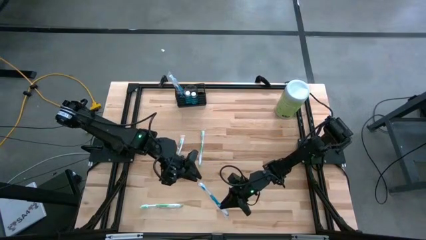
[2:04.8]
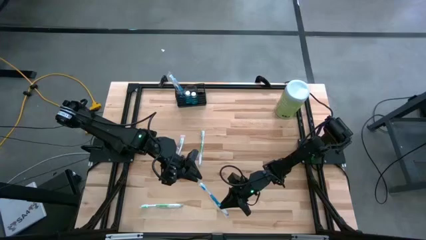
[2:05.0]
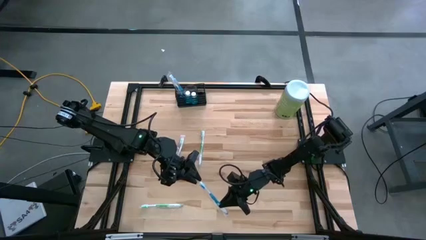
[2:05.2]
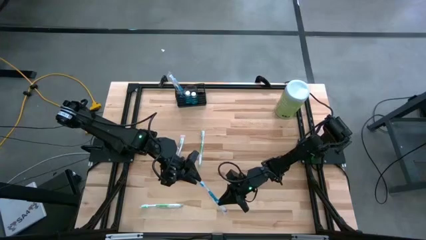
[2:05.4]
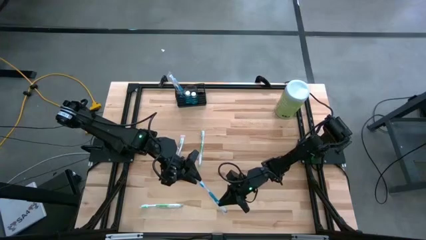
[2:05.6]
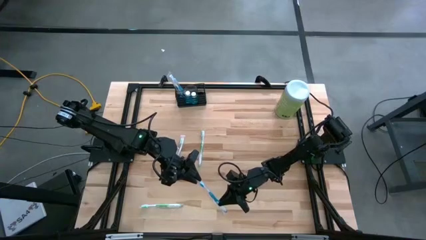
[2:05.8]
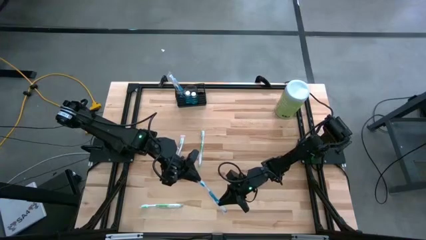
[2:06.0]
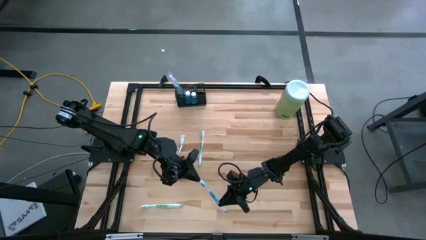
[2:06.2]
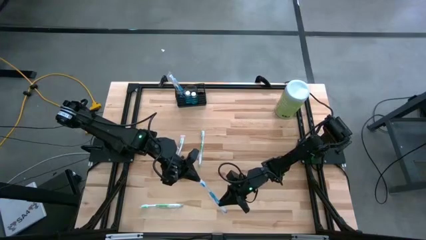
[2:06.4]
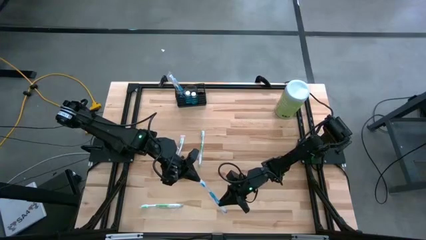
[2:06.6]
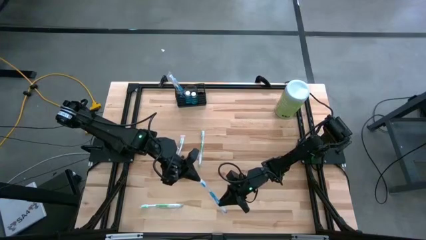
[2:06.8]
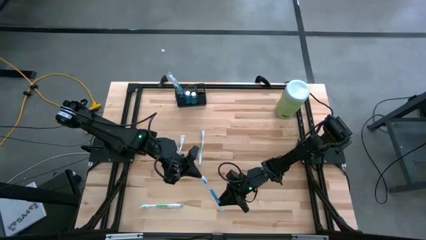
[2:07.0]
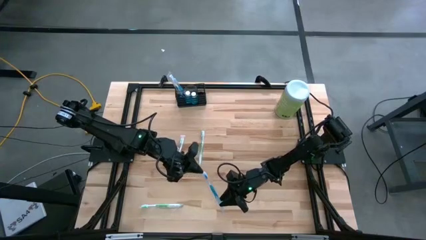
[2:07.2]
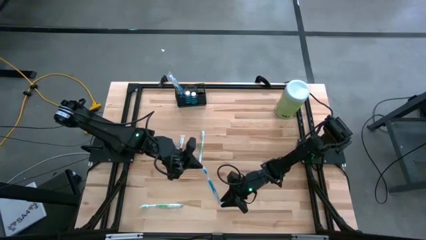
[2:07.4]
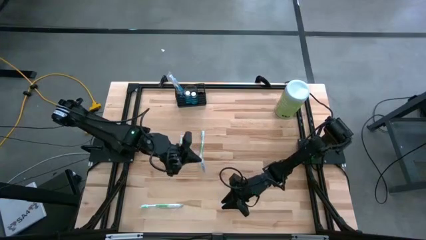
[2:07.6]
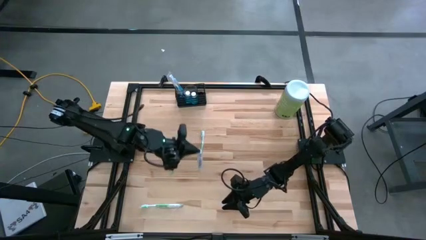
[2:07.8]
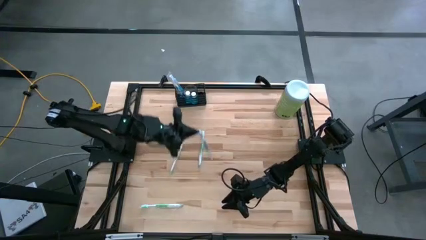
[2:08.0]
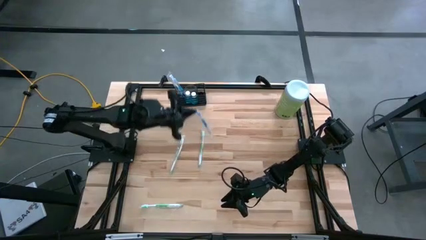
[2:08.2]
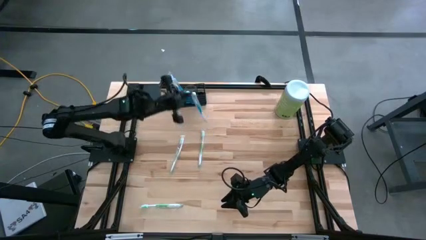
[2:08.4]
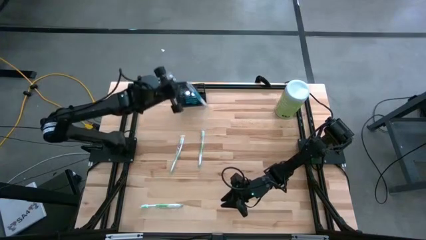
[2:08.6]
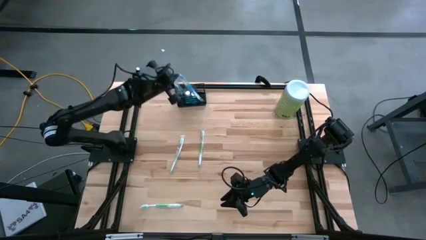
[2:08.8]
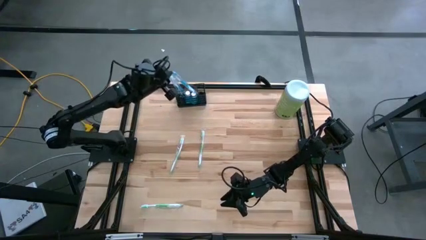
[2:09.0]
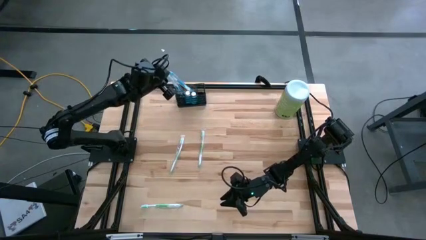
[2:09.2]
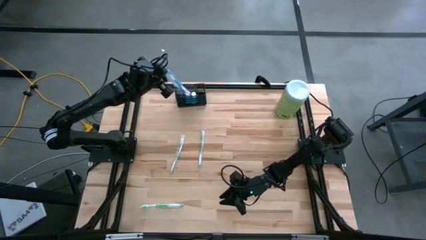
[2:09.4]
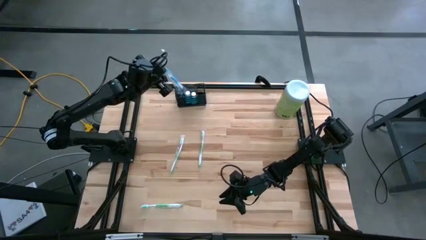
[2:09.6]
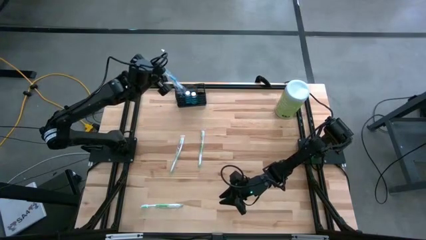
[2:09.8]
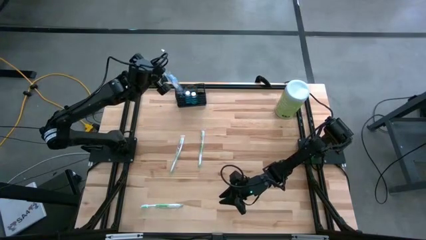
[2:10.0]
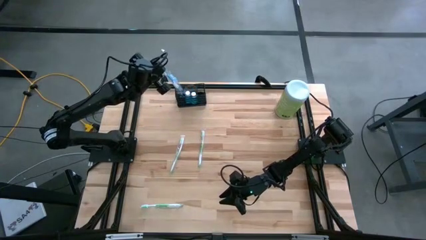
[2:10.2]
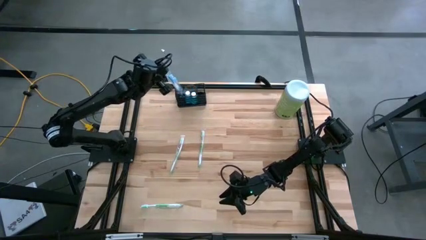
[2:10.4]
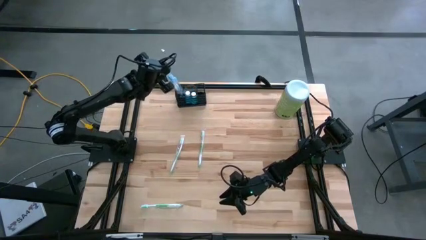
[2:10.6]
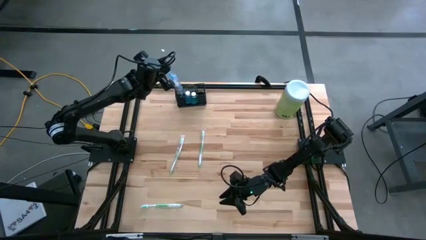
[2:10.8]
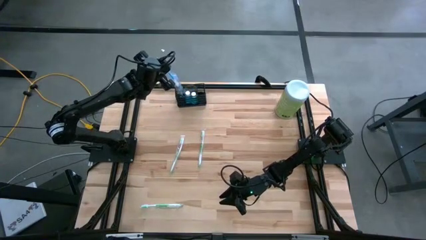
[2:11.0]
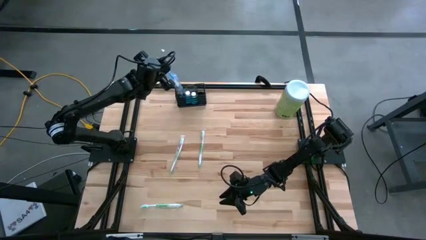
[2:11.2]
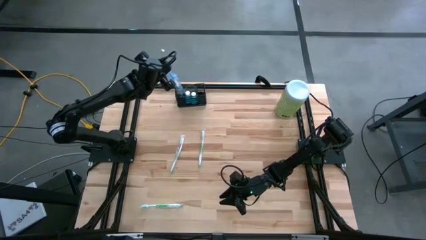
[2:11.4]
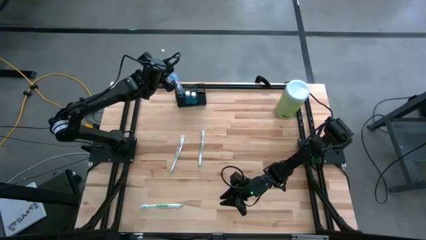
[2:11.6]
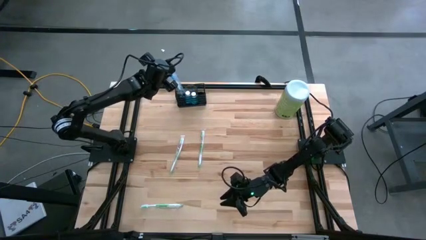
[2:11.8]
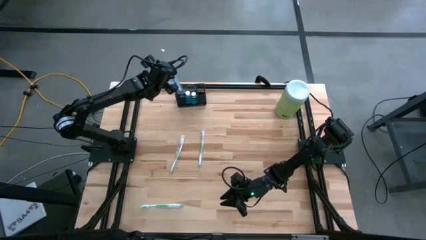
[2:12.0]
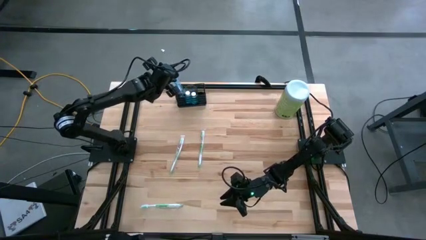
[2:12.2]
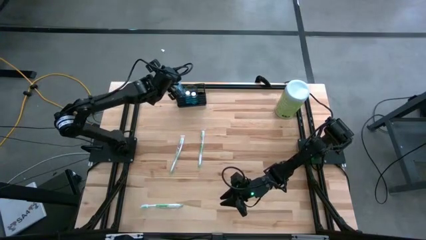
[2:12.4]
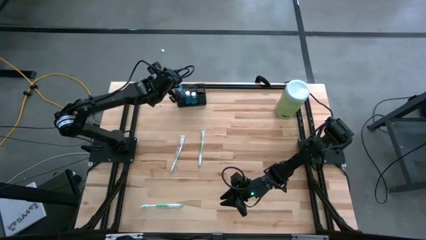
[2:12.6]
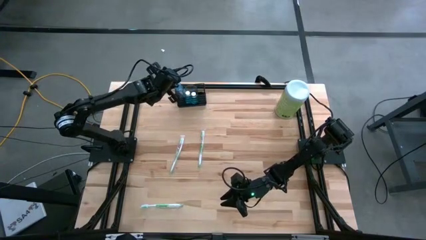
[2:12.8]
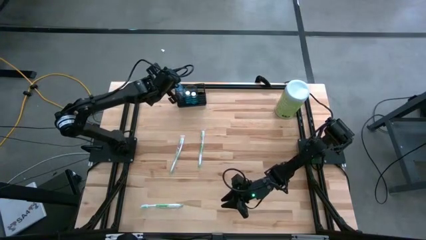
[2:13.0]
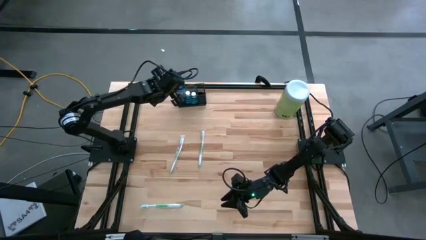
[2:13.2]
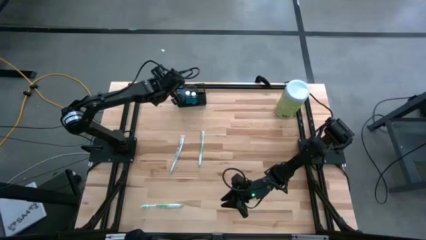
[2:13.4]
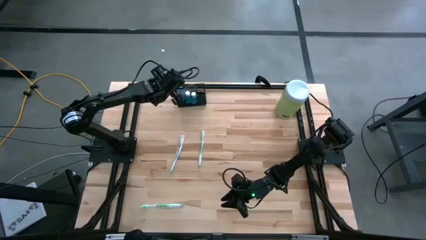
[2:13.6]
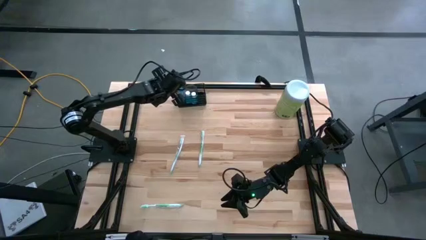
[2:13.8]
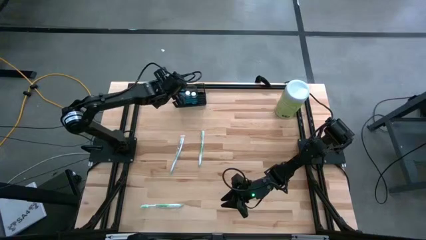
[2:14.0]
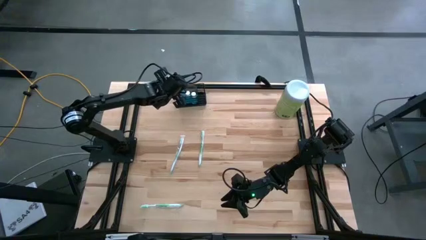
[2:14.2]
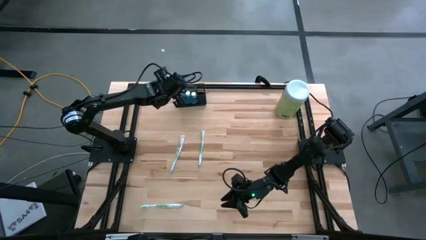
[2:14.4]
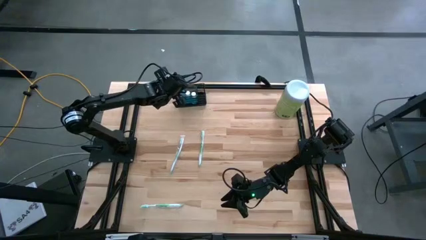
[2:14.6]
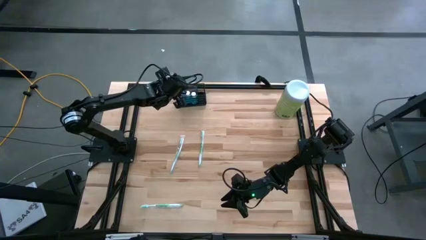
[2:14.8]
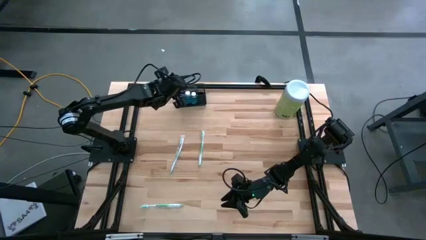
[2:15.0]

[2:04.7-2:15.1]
Task: Pick & Place toothbrushing station
Put the blue toothbrush into the wire organizer
